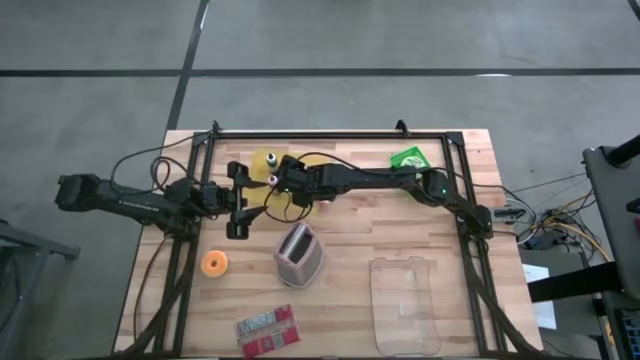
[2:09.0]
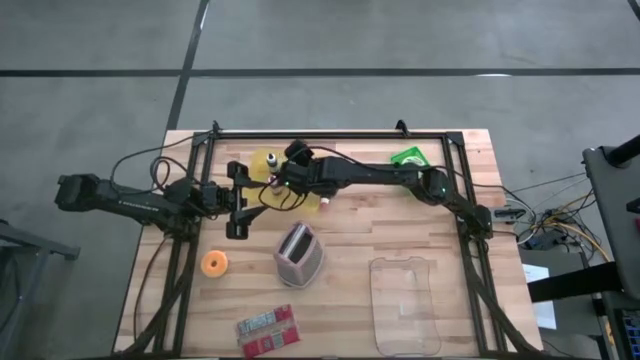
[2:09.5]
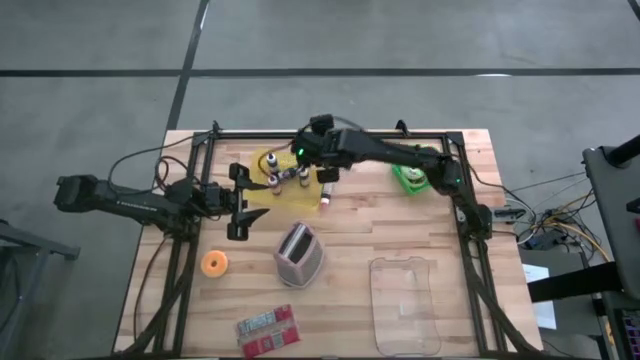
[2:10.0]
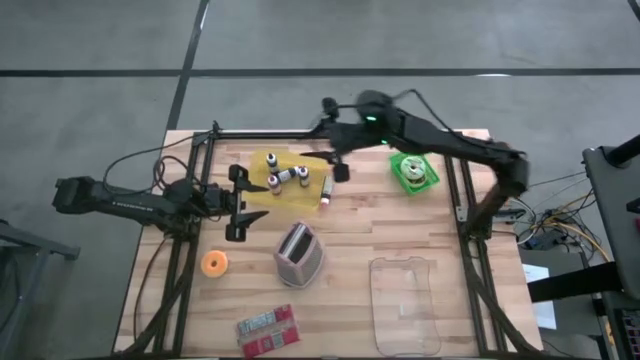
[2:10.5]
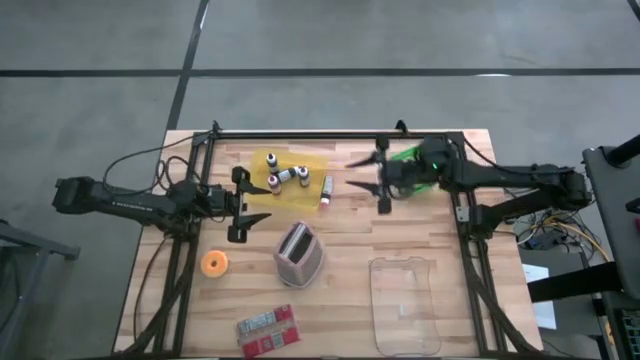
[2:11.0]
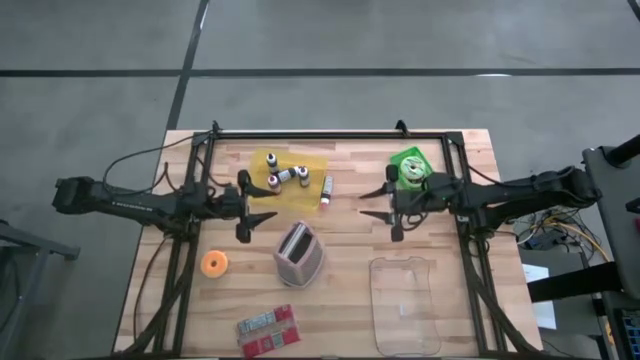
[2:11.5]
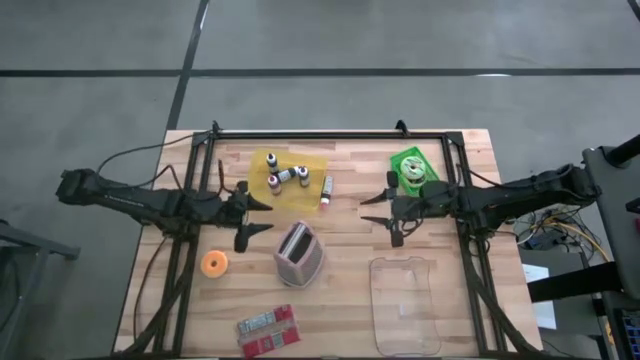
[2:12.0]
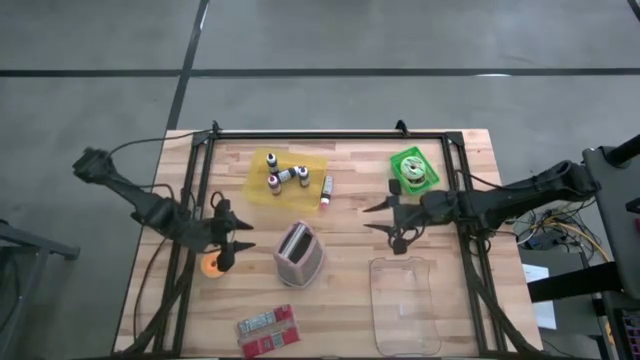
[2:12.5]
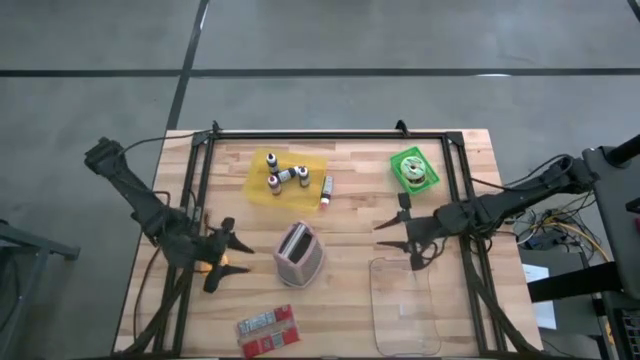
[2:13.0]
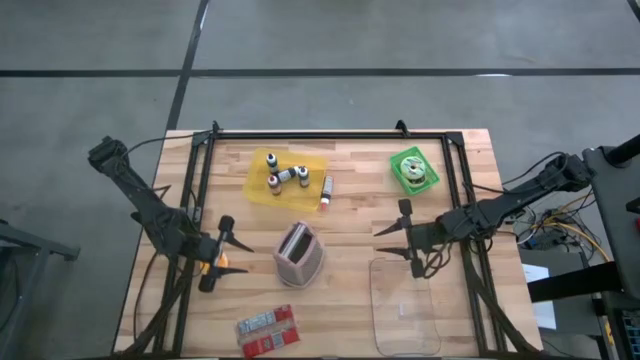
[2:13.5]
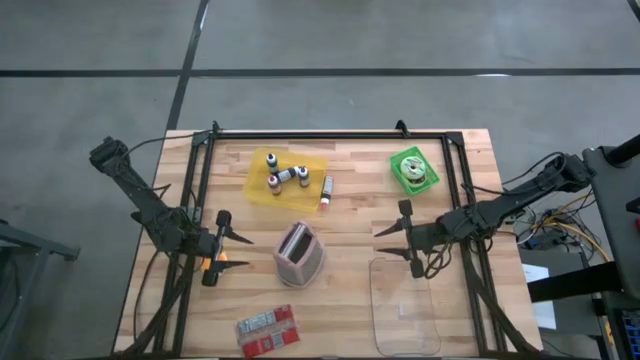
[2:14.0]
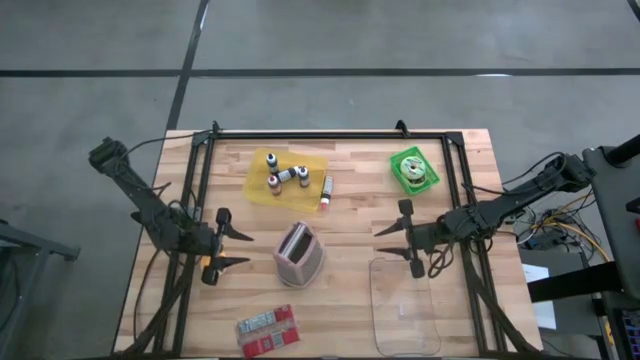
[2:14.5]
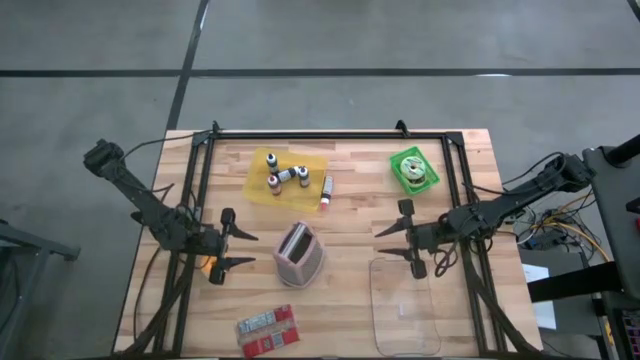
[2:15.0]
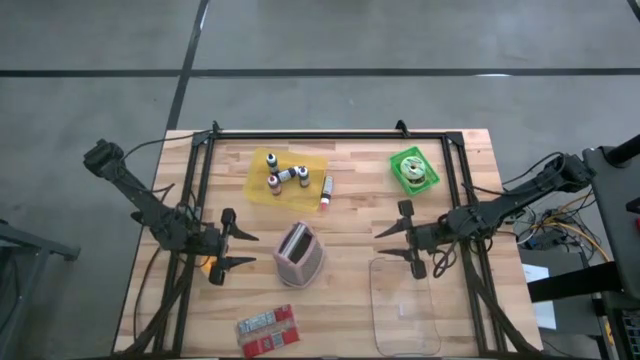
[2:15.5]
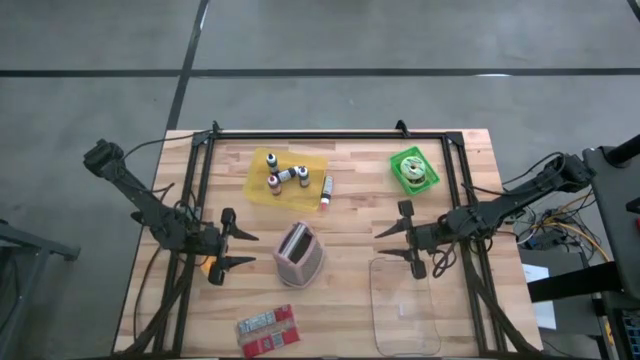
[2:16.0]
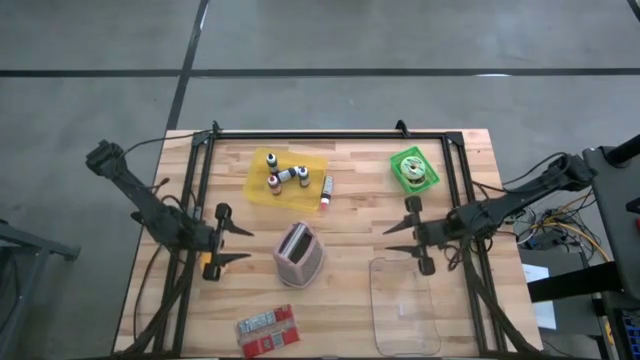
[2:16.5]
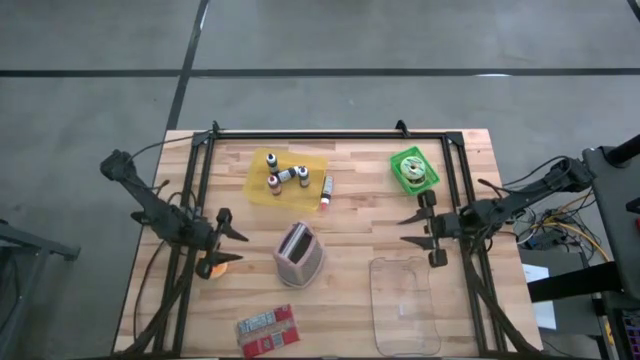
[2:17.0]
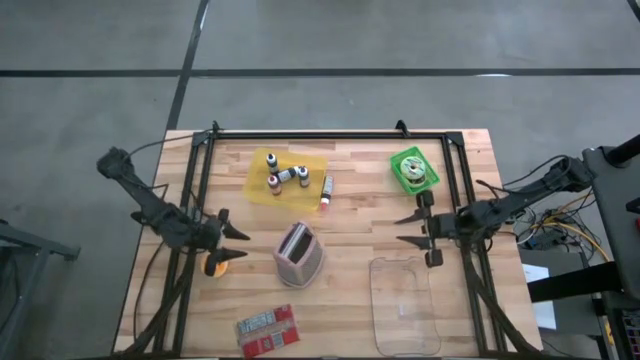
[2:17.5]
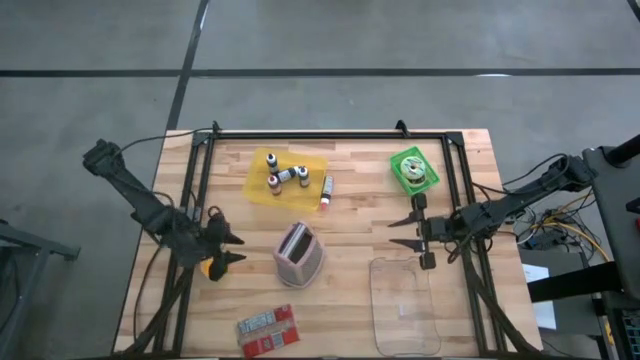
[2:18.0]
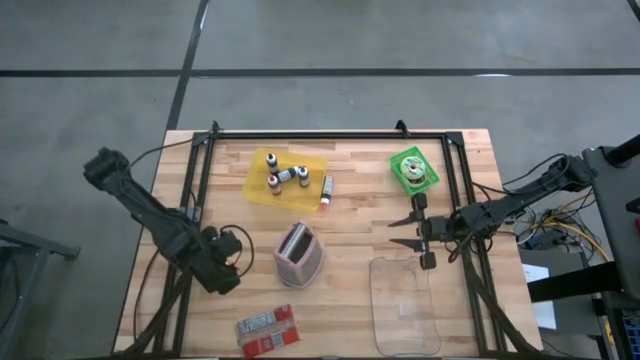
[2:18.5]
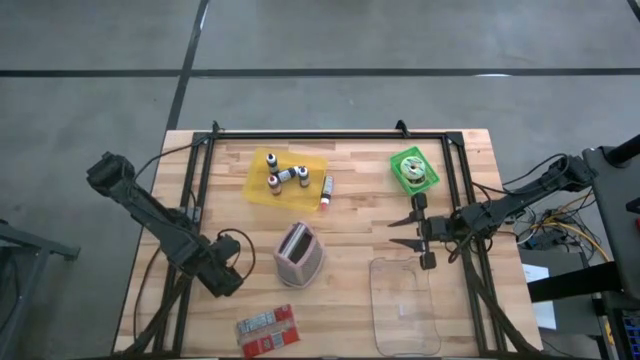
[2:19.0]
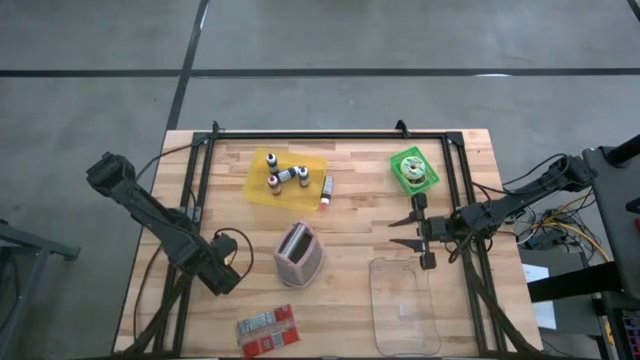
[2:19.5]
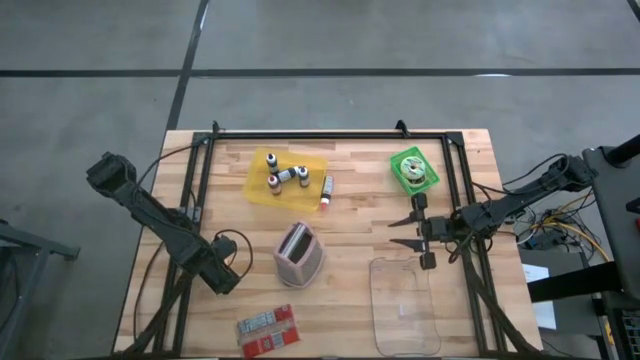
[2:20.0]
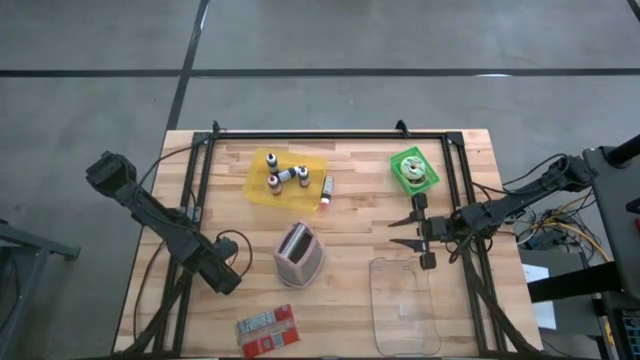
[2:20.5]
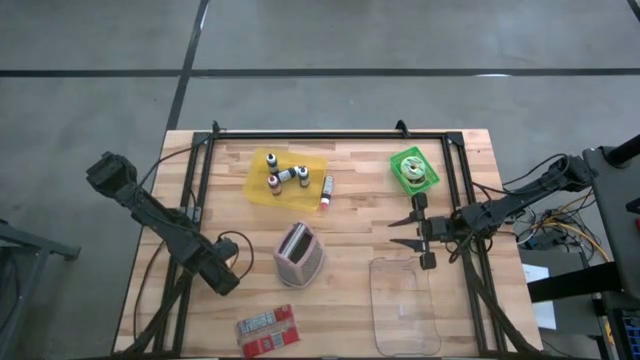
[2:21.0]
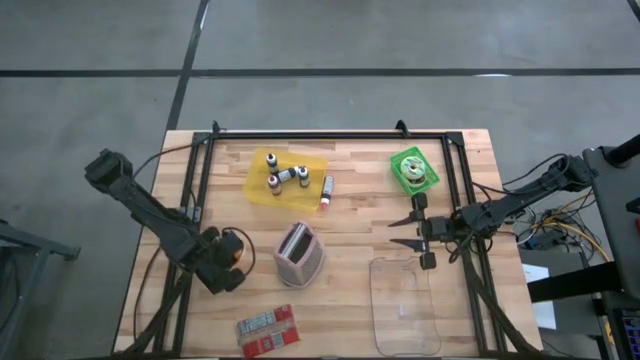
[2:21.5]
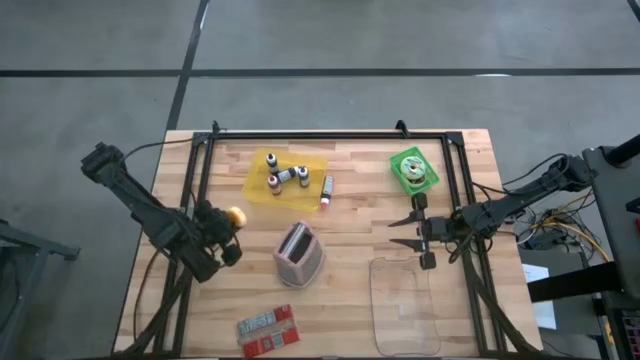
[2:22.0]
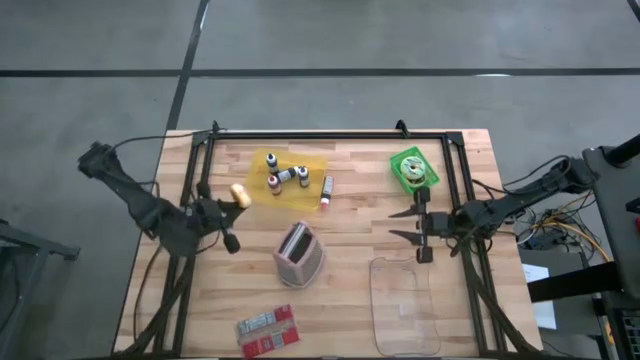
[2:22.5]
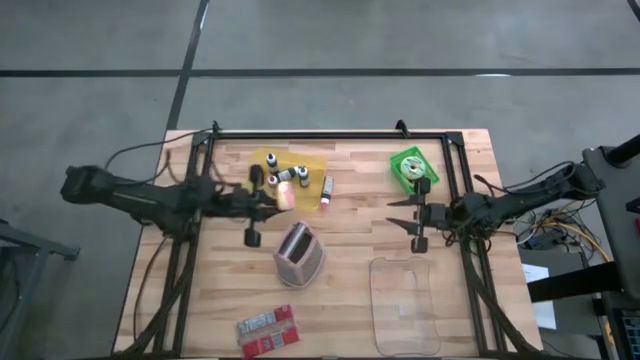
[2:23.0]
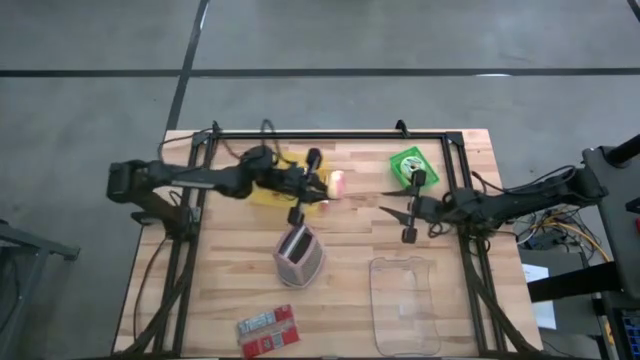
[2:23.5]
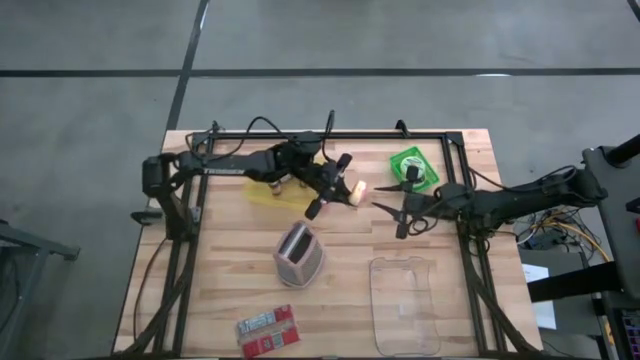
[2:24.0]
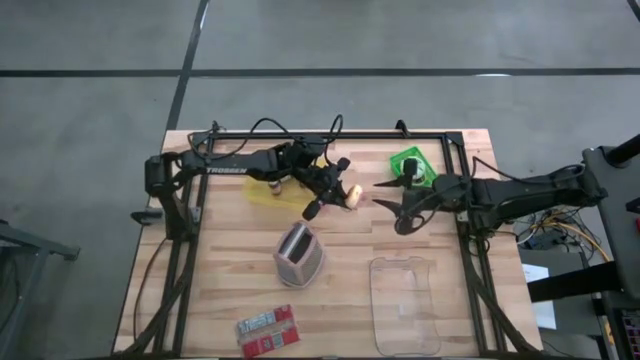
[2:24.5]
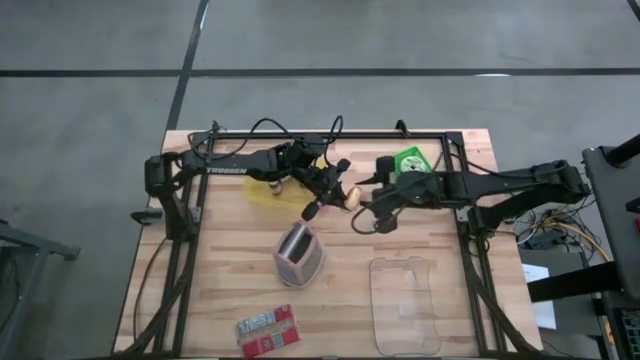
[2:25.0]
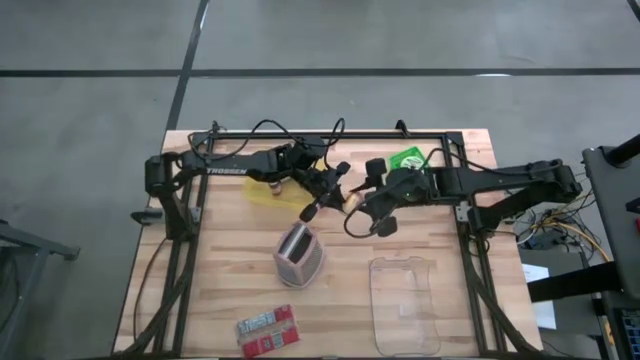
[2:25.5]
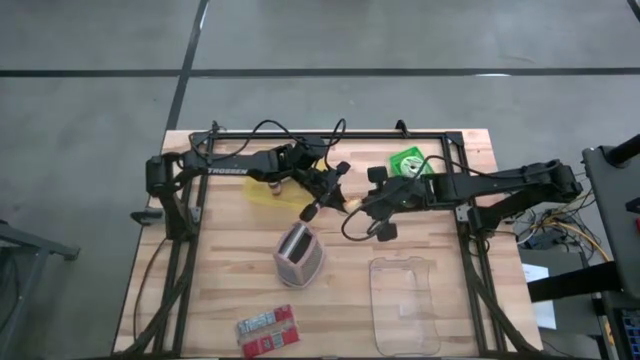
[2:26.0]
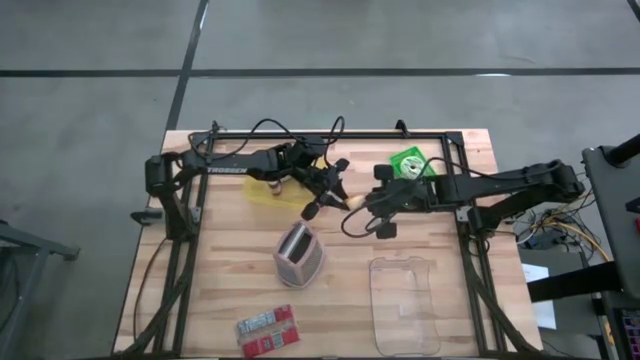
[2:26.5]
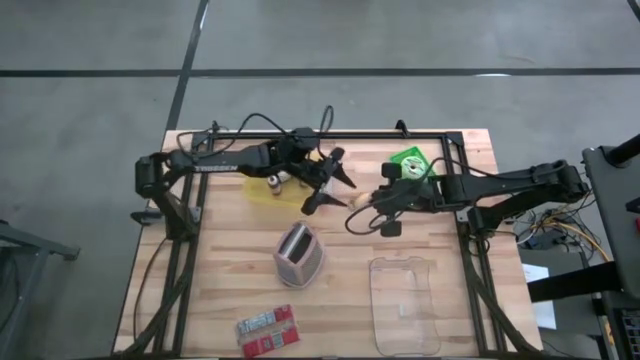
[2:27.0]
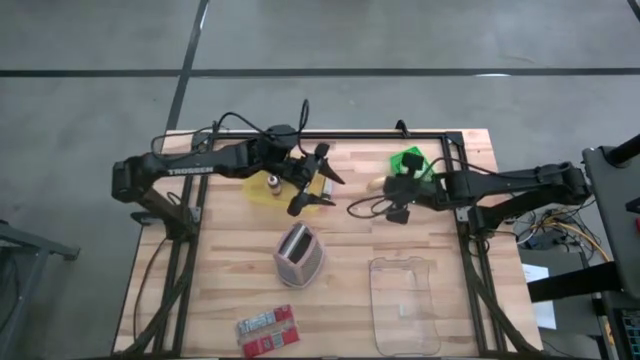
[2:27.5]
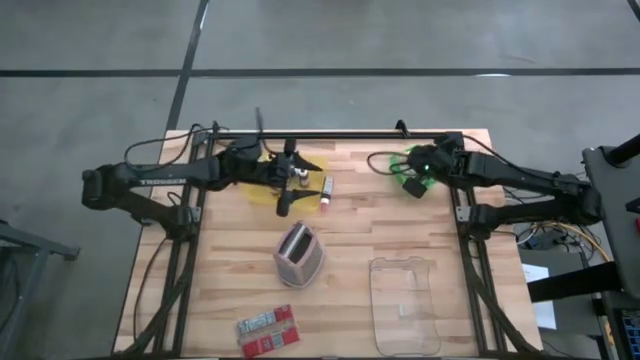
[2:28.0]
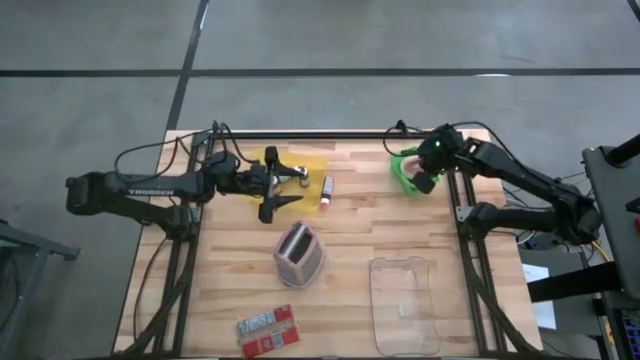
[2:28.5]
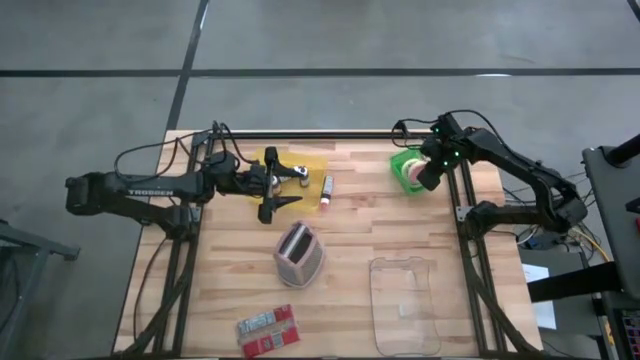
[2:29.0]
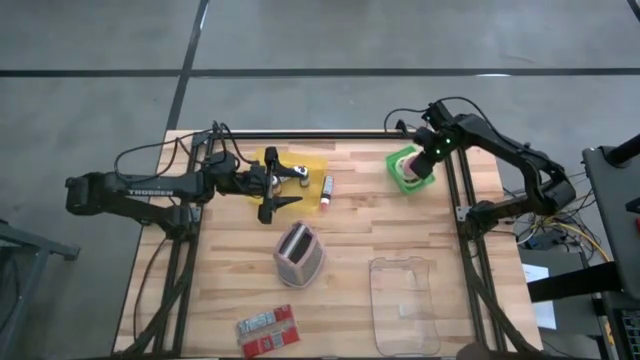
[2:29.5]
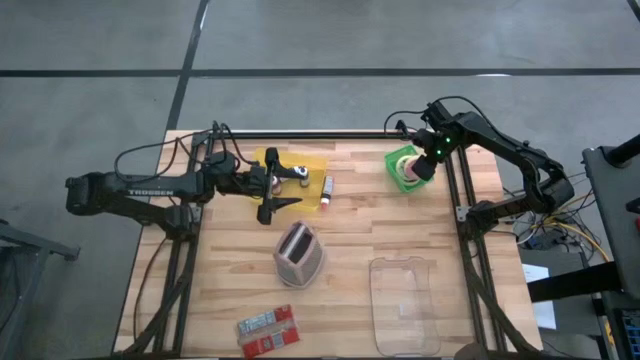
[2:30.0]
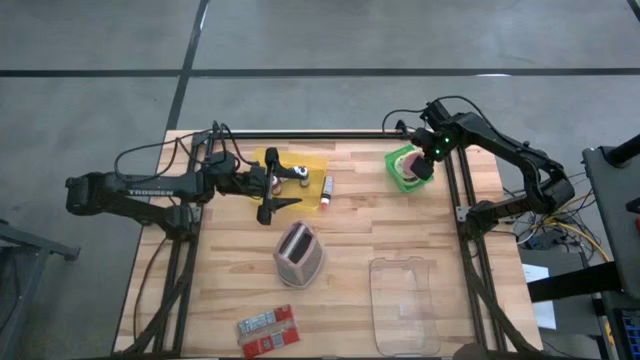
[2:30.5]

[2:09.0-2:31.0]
Task: Pick & Place Food Item
Put the pink donut into the green bin
